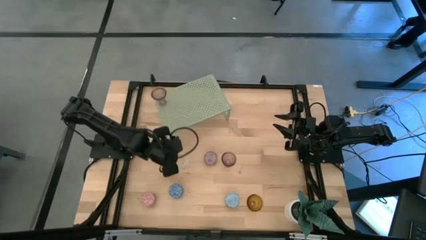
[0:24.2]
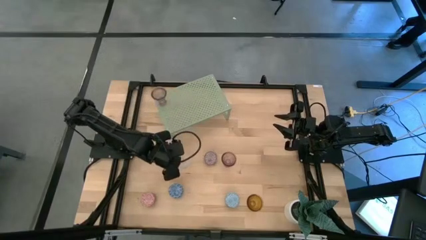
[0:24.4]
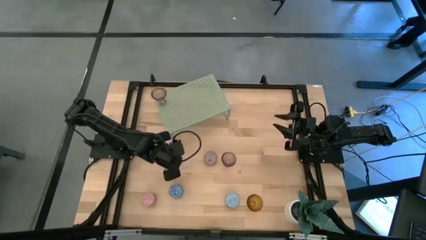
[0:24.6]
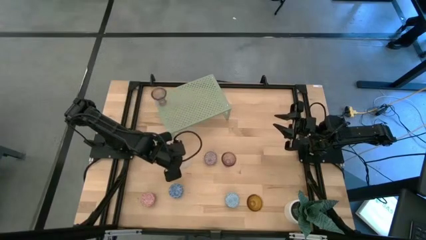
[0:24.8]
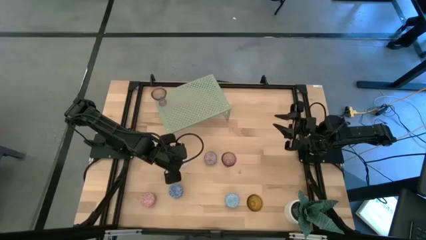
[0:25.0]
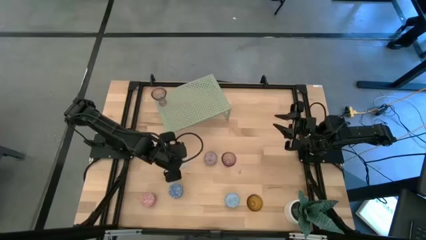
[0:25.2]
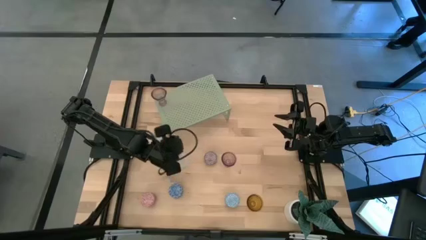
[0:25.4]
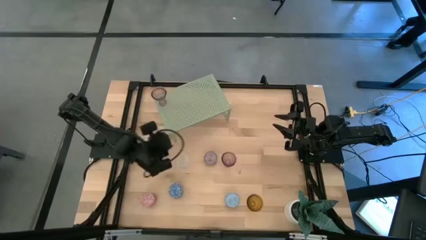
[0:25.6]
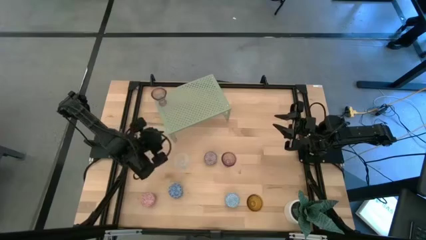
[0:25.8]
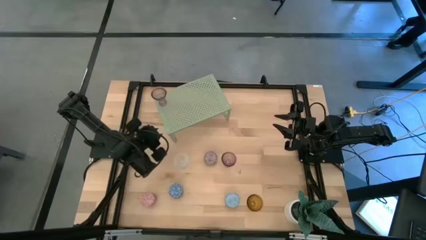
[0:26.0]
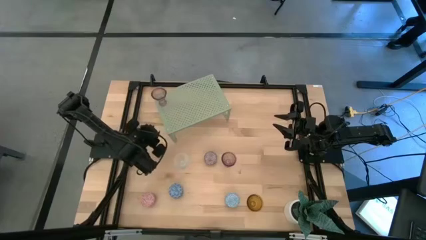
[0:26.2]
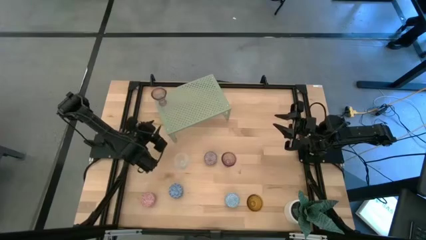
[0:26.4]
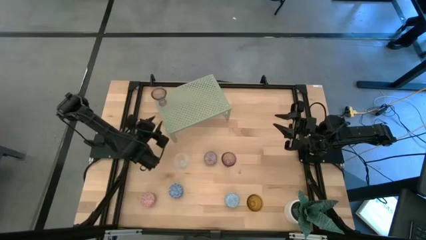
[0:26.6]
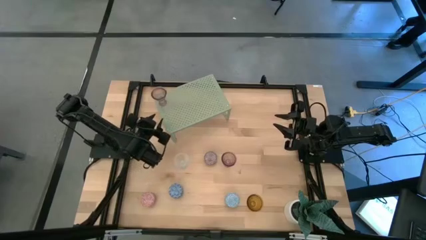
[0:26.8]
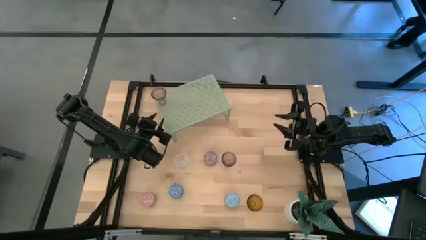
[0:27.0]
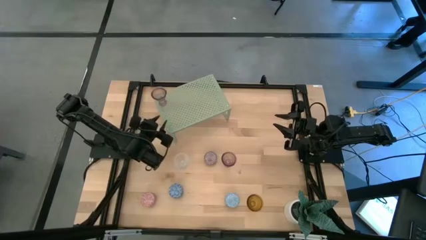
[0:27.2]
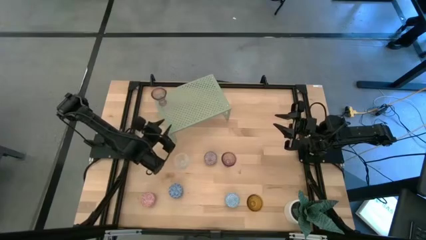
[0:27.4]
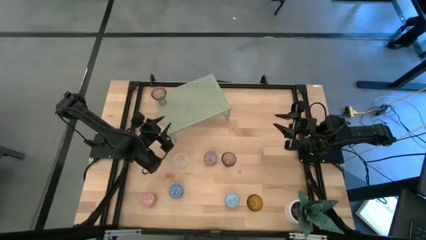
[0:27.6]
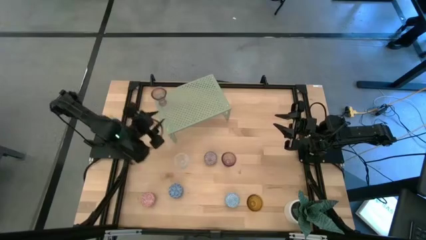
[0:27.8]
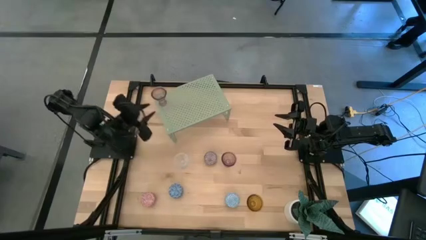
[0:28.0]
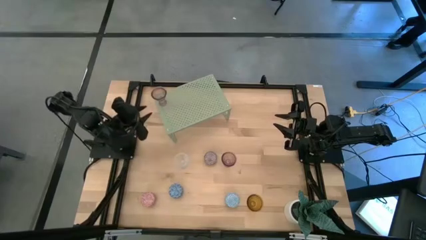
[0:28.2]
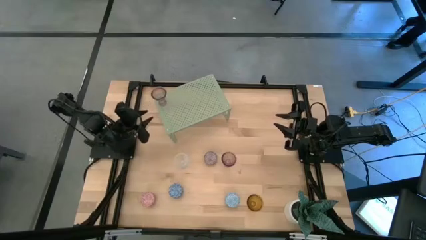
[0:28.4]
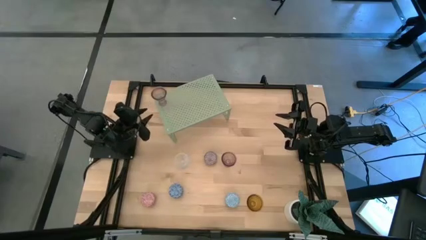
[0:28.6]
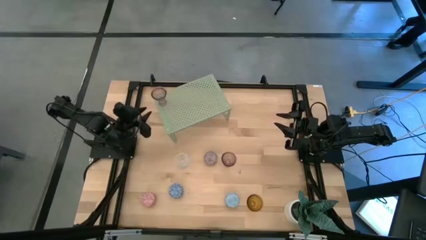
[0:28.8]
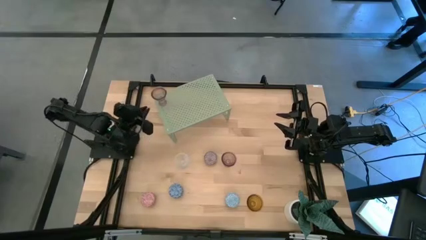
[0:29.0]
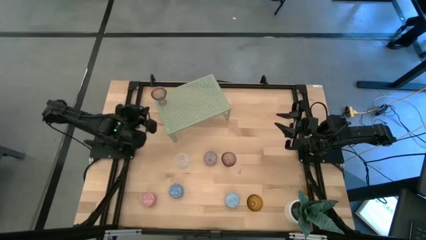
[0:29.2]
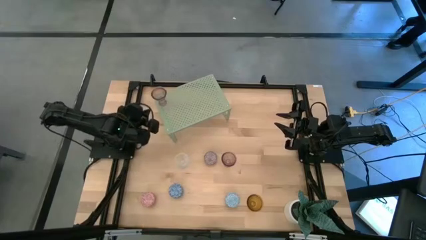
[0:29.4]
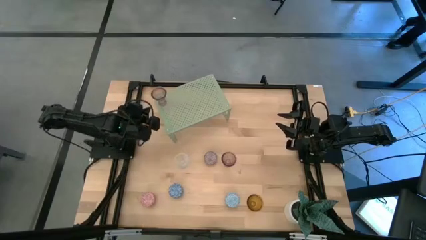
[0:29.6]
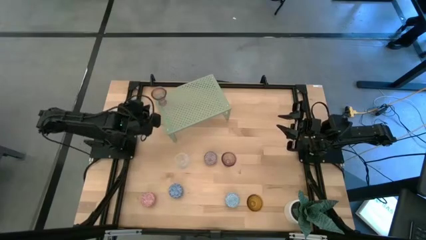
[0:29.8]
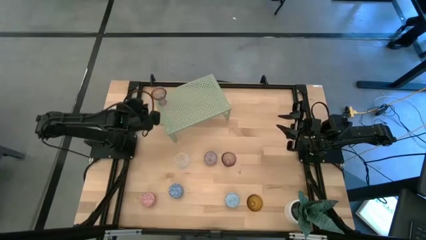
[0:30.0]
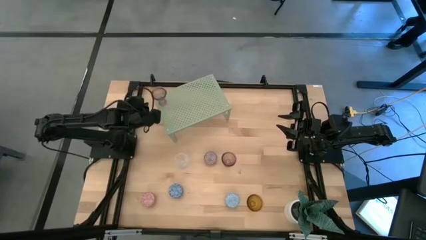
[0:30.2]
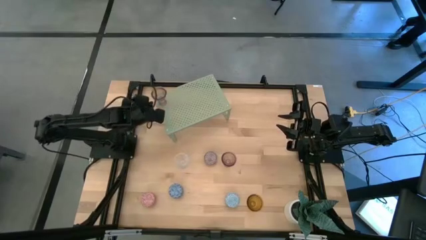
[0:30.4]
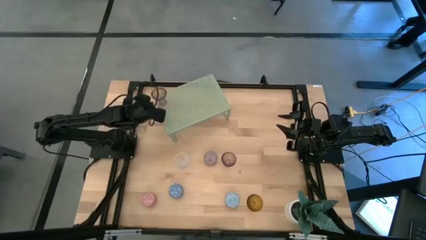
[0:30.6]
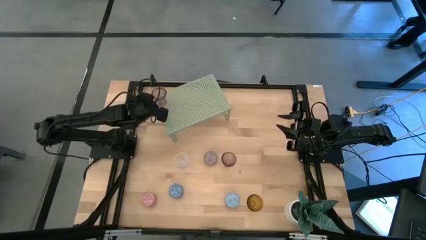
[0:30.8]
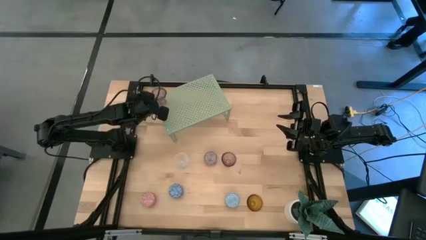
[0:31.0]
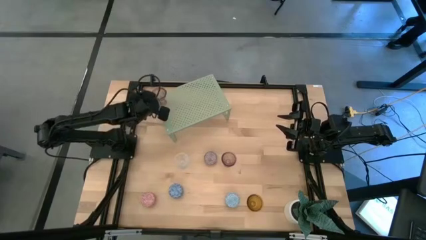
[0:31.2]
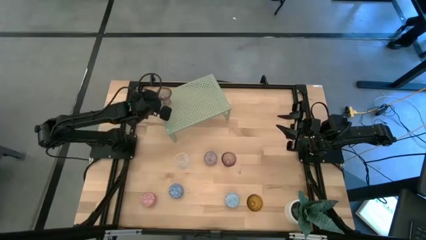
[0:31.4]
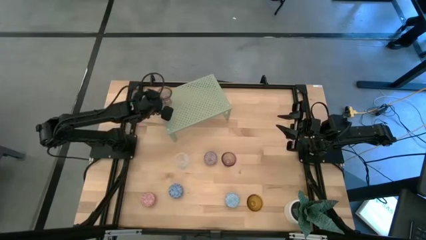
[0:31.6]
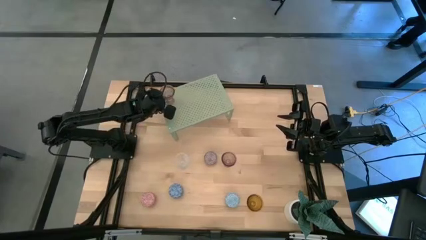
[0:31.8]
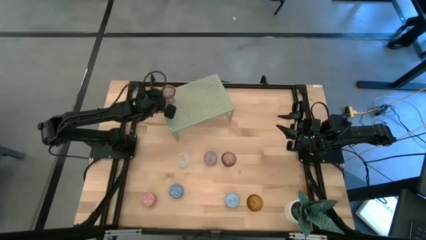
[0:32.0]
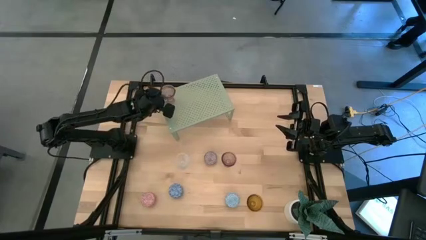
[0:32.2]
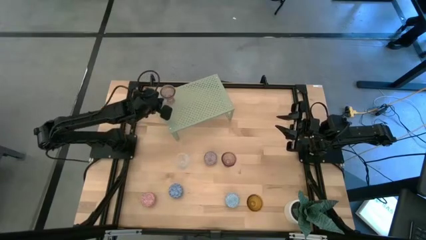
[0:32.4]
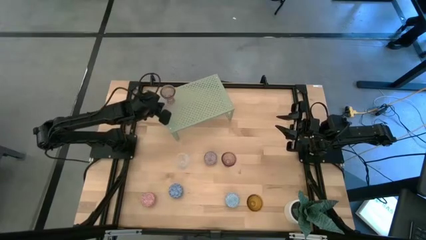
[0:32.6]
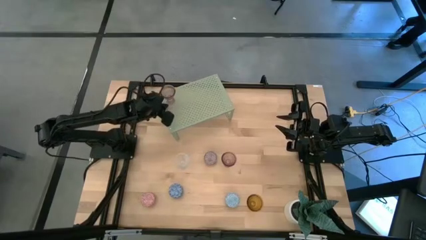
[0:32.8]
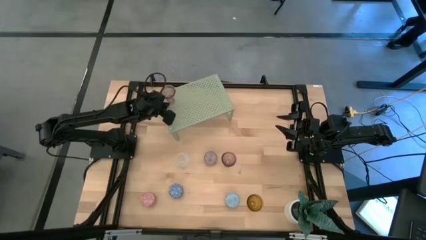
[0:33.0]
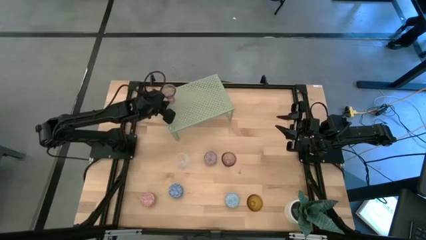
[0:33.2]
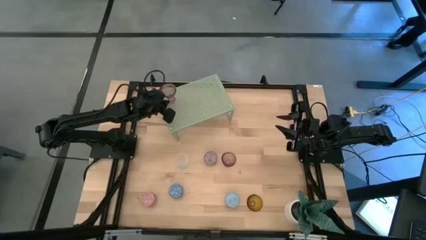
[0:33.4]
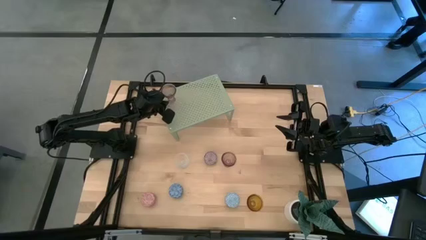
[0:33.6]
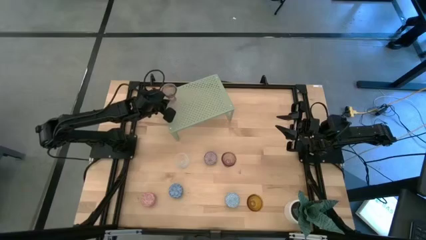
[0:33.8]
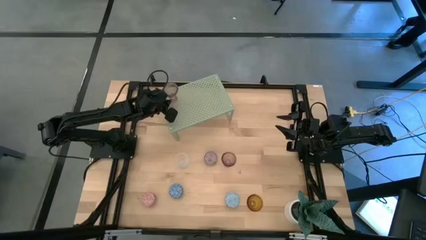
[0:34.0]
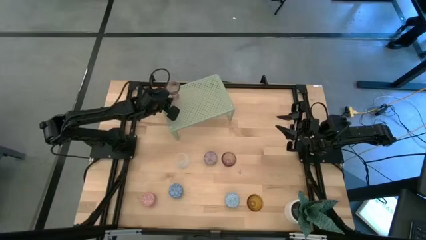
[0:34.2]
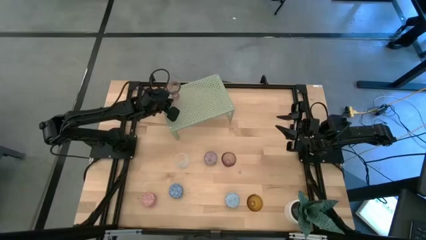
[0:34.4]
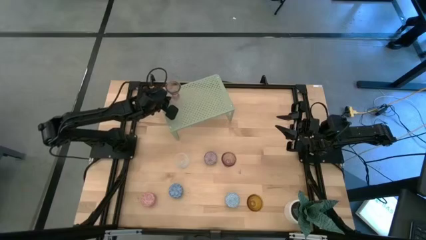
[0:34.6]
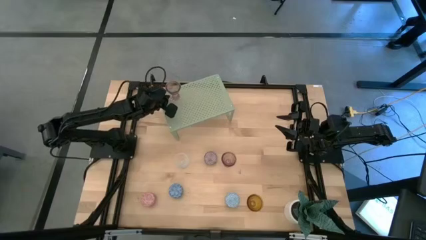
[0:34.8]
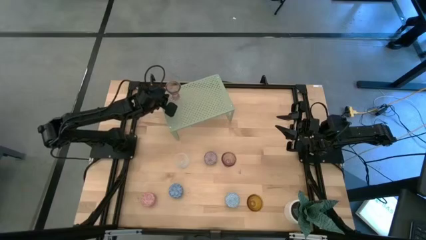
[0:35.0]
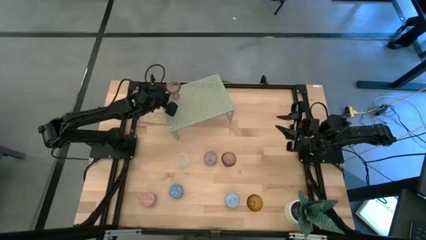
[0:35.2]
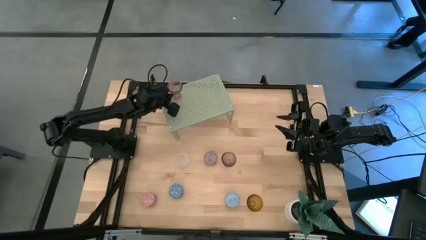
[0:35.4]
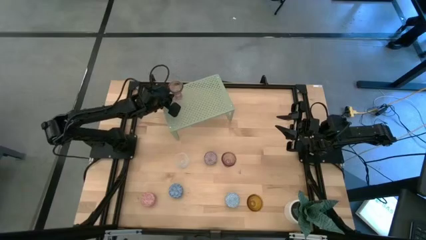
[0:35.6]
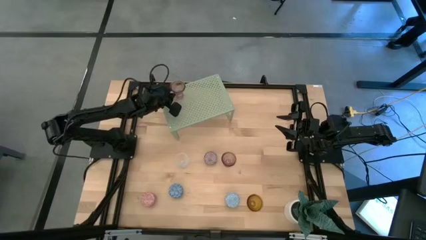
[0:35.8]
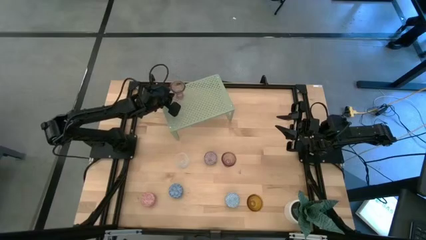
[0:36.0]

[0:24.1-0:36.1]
Task: Pick & Place candle stick holders
Put the left pink glass candle holder on the shelf
